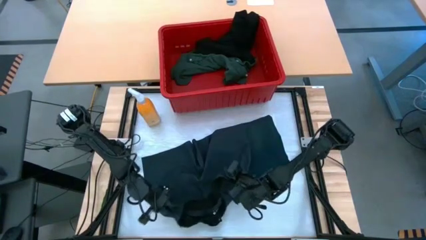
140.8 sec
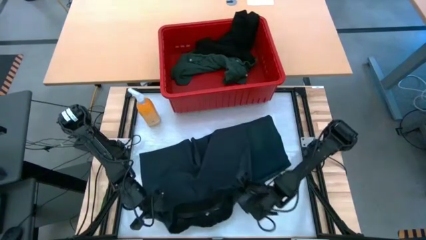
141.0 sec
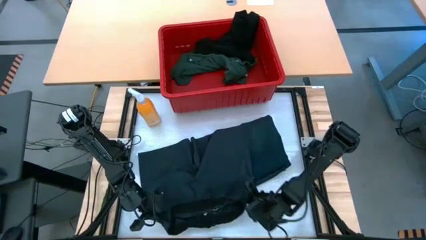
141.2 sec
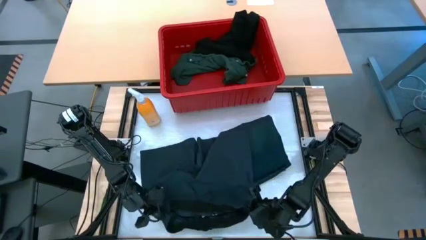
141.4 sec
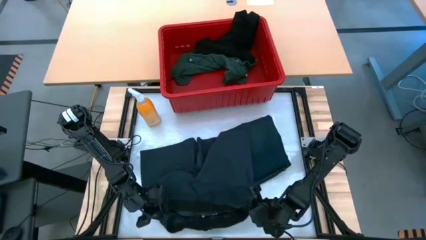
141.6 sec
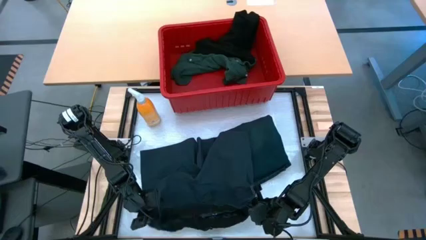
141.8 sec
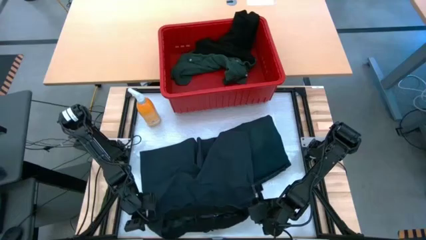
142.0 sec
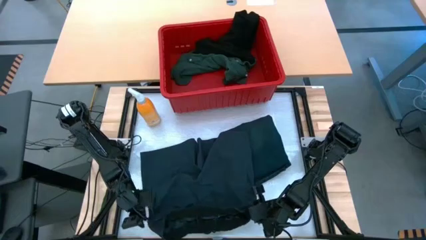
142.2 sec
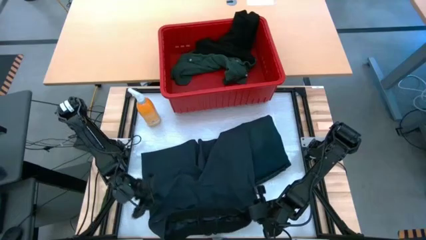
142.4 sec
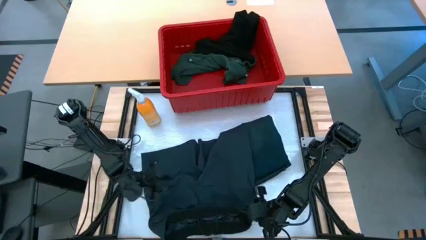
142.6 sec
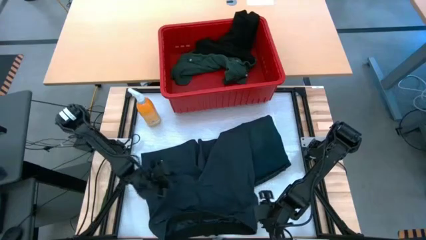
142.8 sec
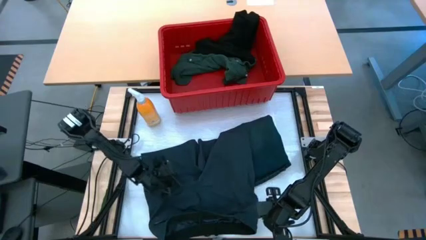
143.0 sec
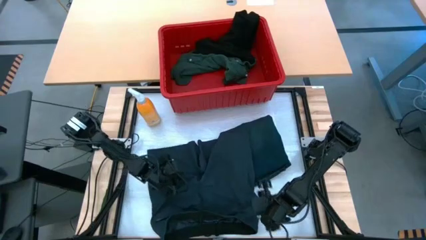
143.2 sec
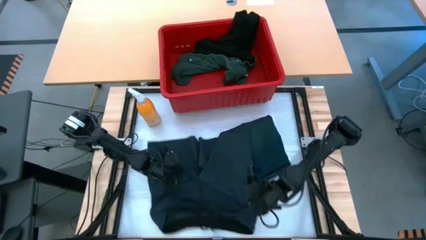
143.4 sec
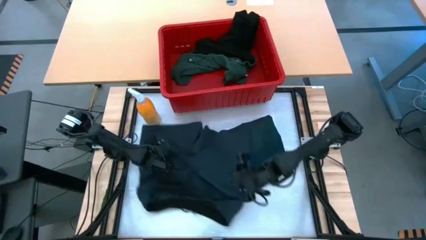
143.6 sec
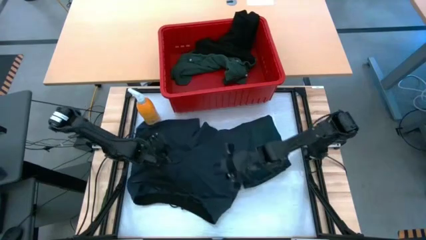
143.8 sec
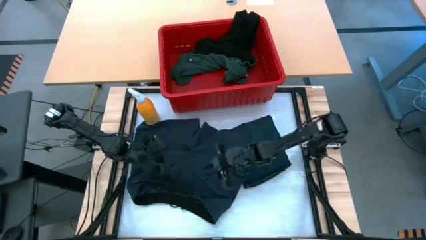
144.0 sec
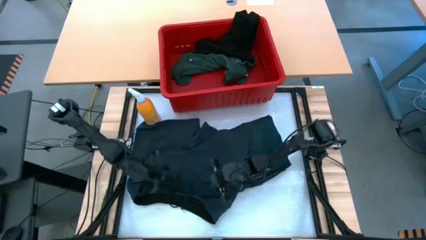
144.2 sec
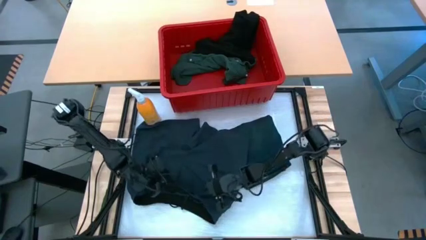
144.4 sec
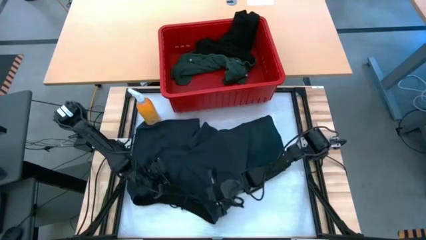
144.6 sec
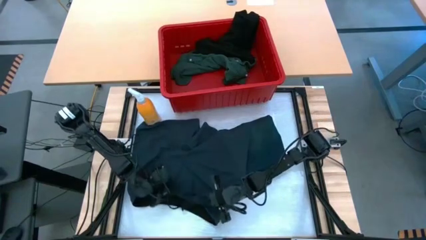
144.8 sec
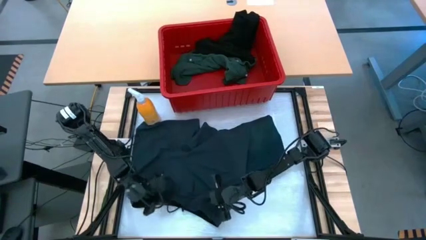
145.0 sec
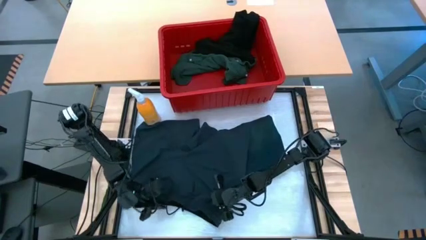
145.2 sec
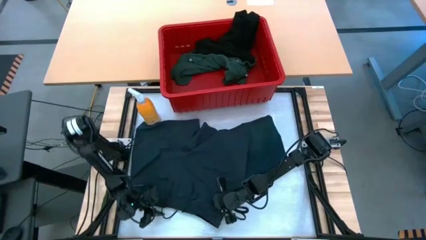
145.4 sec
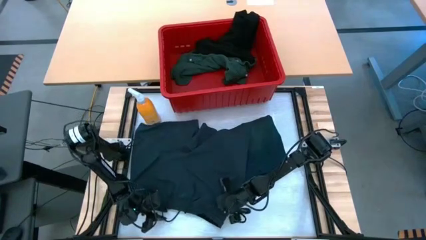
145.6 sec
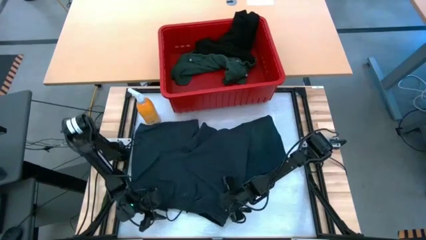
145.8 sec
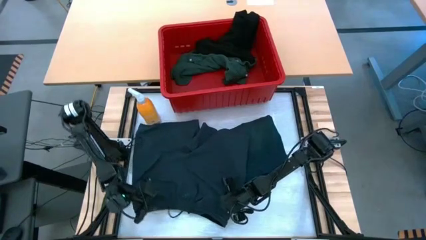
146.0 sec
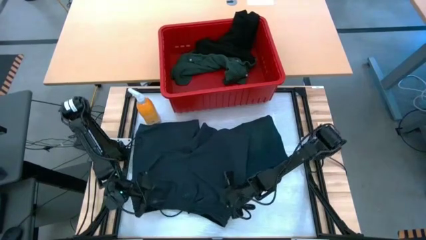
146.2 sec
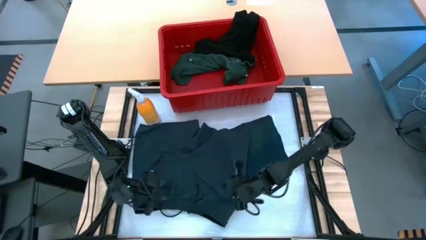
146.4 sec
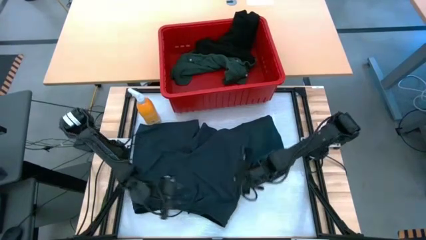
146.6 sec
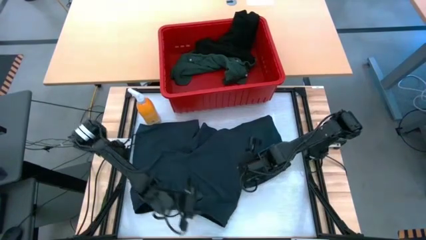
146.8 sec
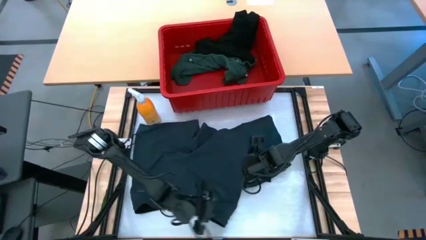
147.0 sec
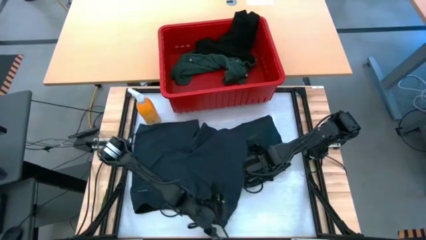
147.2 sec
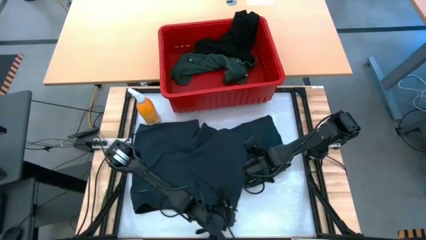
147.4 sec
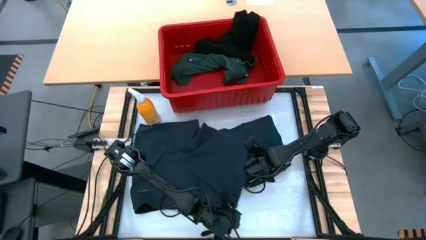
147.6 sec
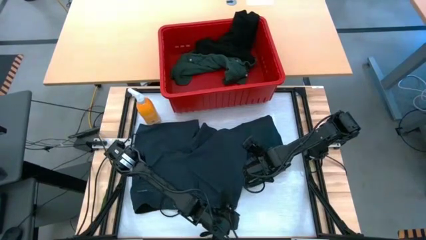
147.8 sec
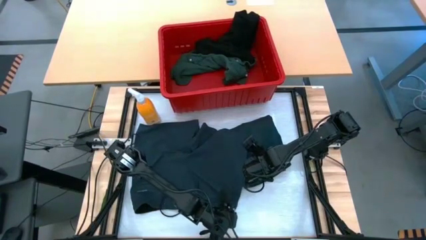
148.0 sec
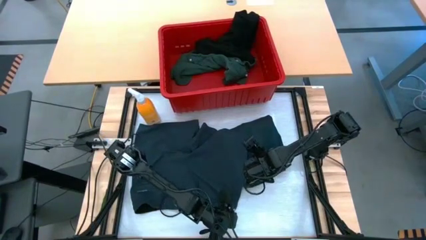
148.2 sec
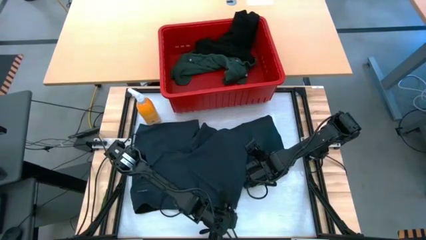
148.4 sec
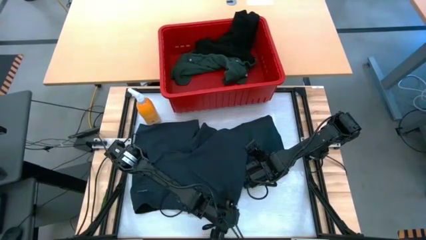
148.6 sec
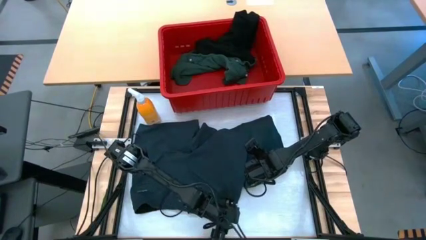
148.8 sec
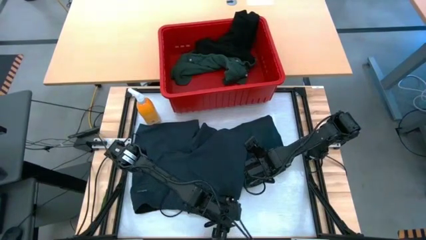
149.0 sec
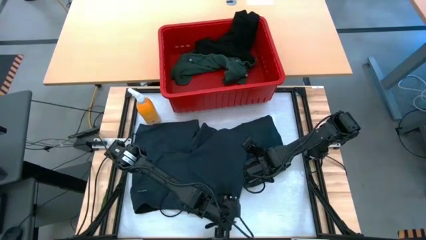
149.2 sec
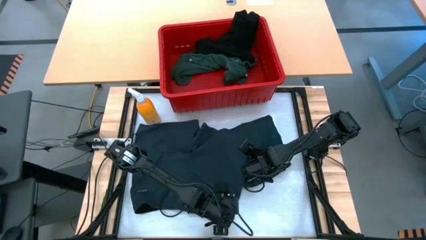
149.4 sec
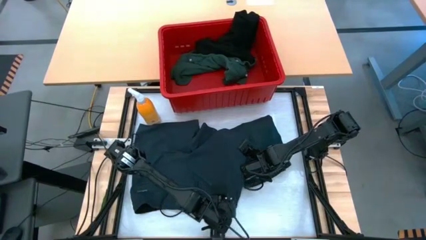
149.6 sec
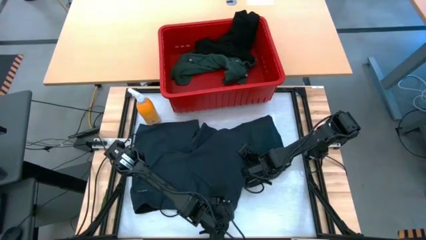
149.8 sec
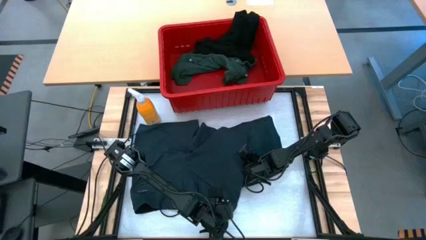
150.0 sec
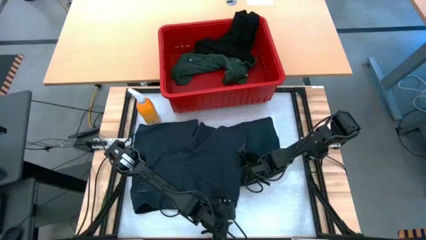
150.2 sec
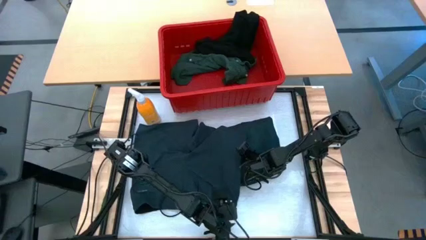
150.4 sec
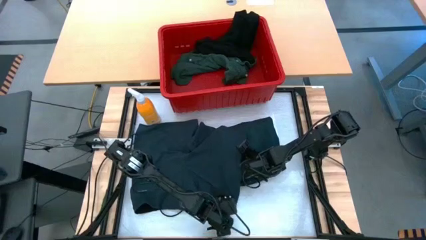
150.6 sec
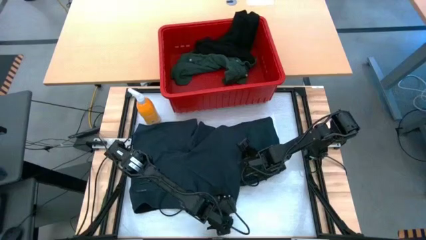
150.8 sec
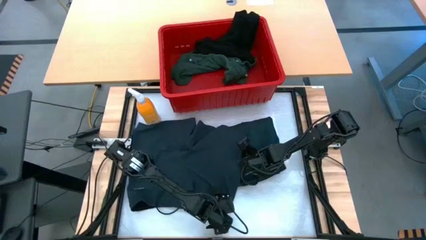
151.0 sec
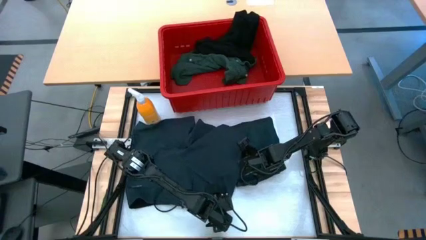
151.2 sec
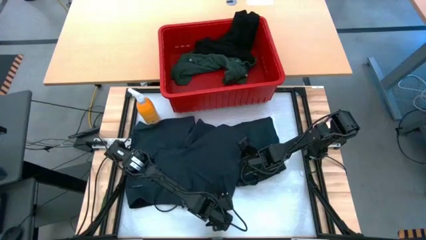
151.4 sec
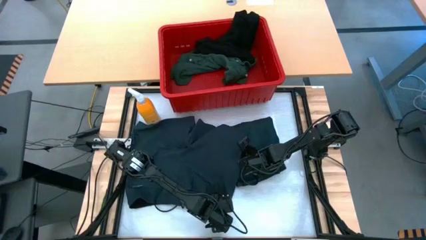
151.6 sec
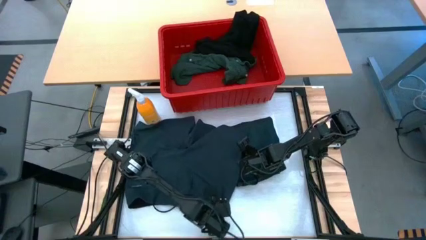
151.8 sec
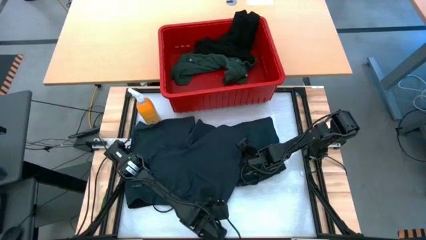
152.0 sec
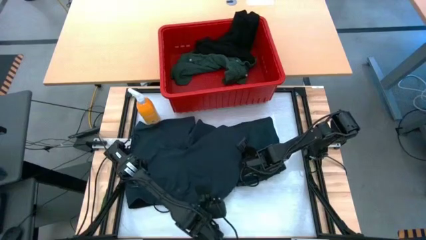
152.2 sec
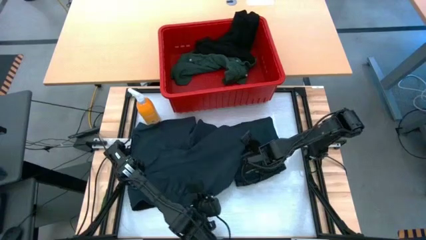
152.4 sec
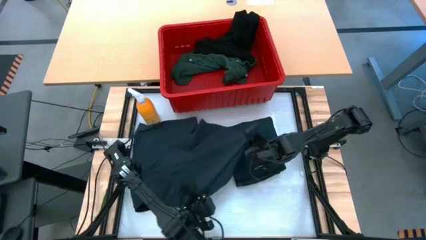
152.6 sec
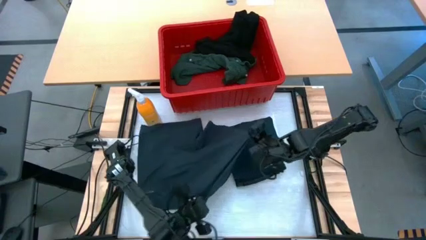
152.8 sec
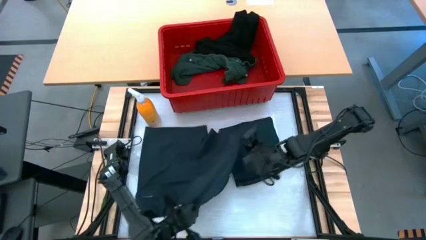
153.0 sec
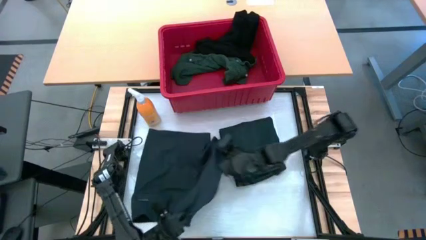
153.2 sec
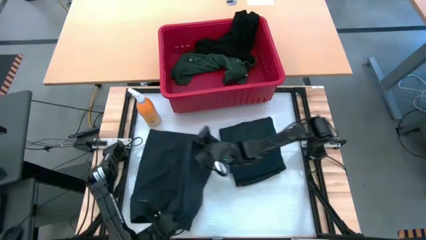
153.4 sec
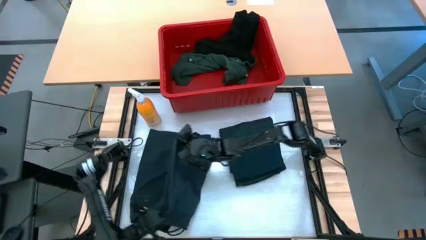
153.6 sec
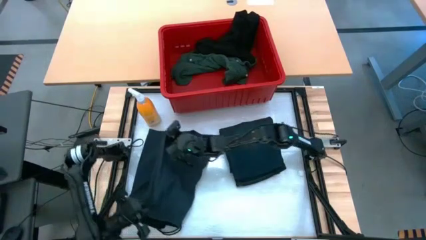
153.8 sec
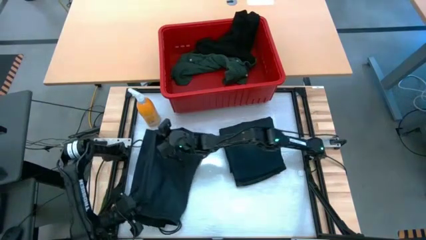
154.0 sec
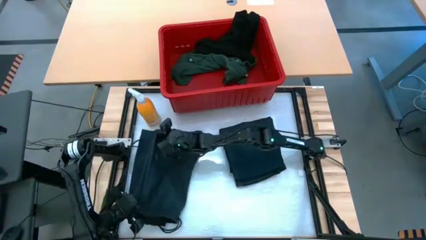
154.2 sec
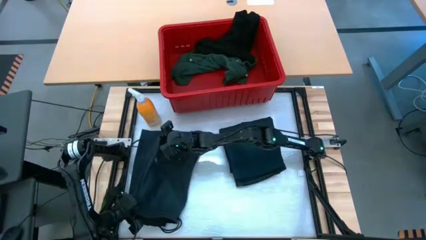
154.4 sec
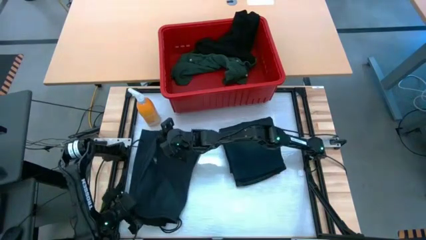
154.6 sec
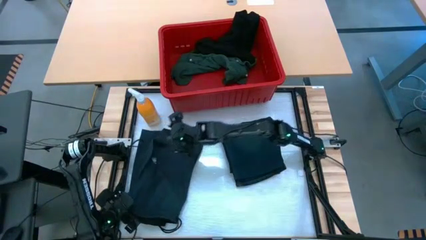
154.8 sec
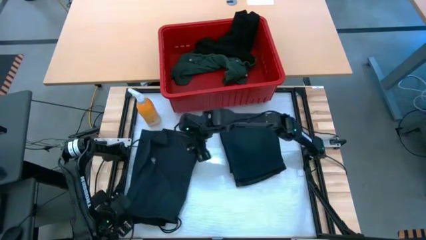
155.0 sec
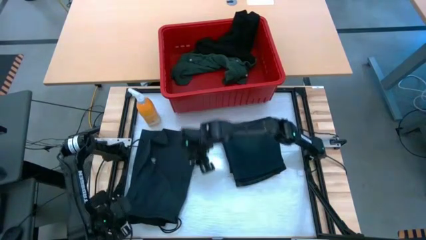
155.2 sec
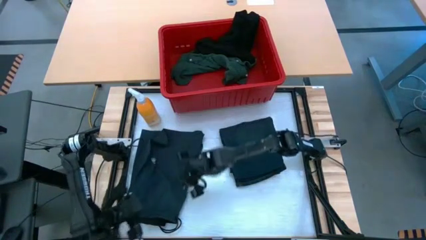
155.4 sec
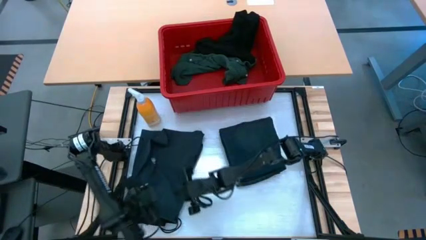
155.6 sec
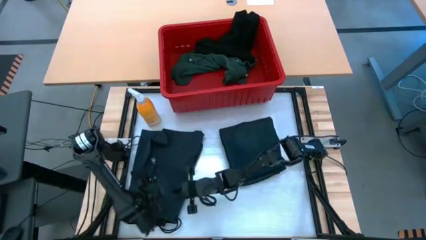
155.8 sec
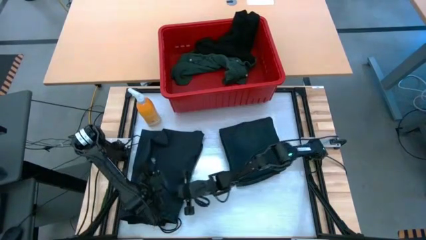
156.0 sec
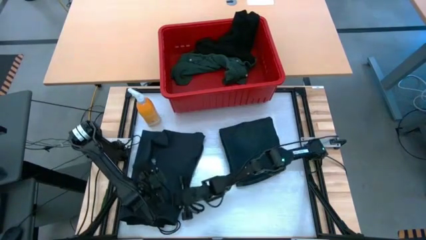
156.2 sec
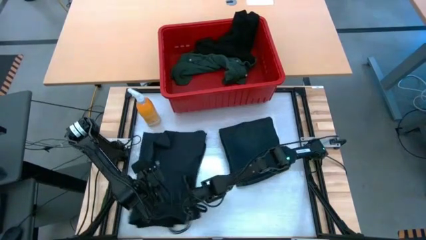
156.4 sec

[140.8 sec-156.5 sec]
Task: Fold Laundry from Bin
Fold the dark blue shorts
